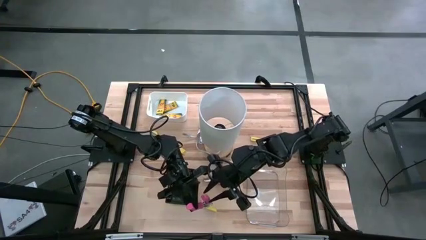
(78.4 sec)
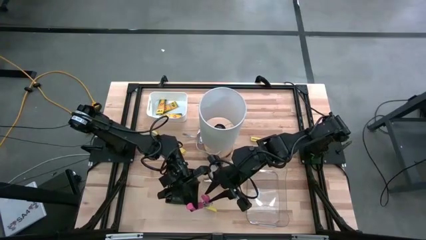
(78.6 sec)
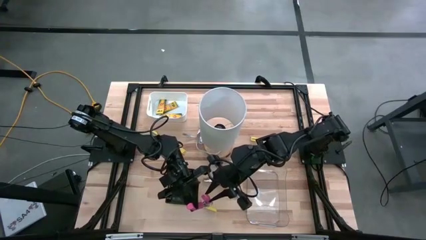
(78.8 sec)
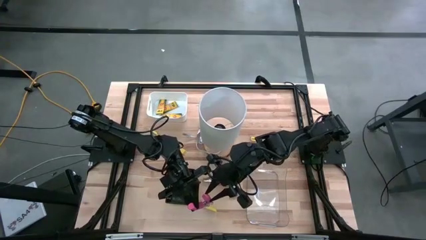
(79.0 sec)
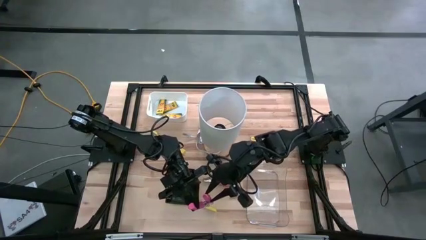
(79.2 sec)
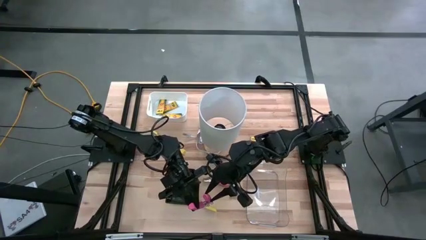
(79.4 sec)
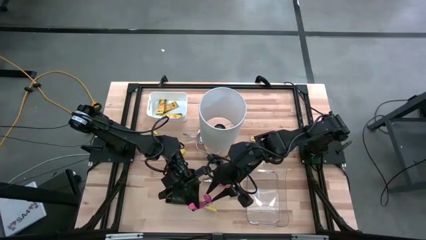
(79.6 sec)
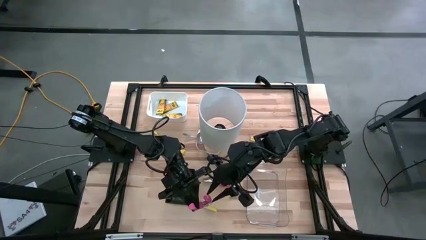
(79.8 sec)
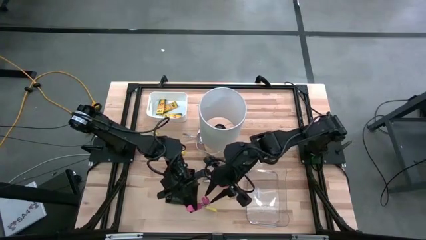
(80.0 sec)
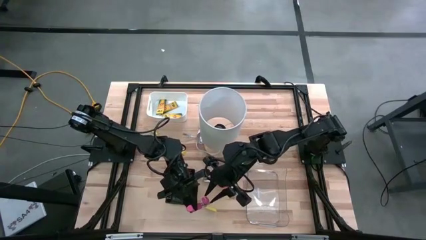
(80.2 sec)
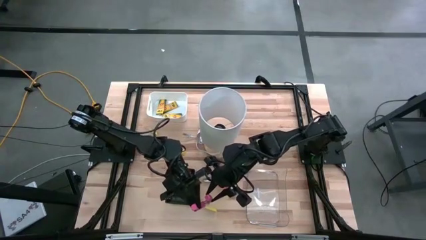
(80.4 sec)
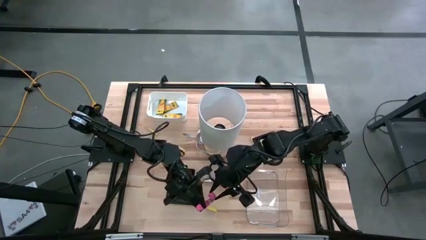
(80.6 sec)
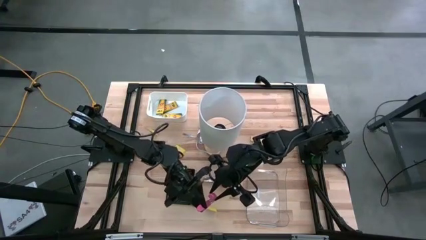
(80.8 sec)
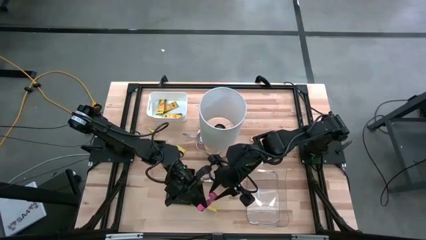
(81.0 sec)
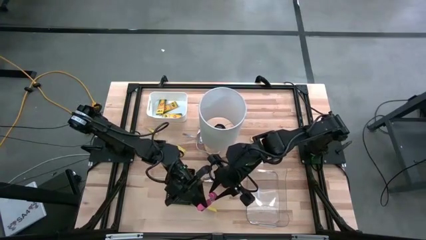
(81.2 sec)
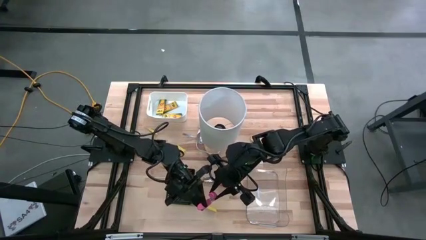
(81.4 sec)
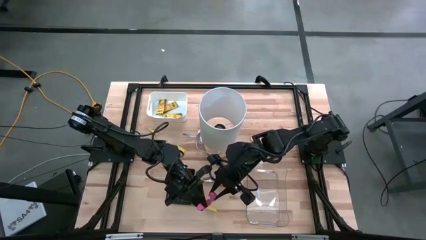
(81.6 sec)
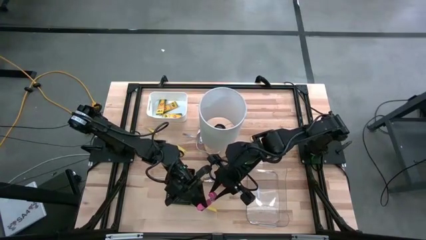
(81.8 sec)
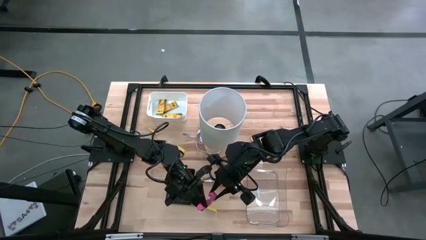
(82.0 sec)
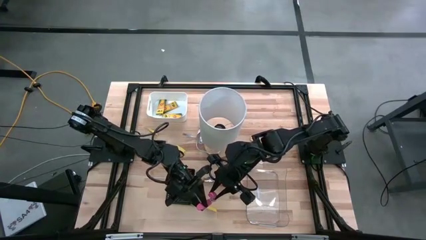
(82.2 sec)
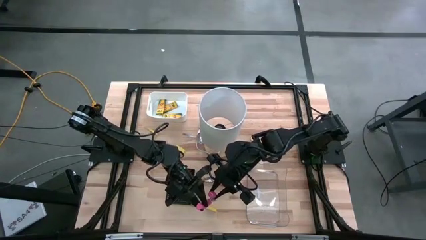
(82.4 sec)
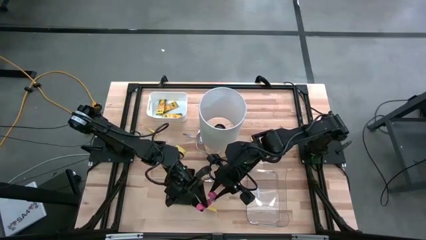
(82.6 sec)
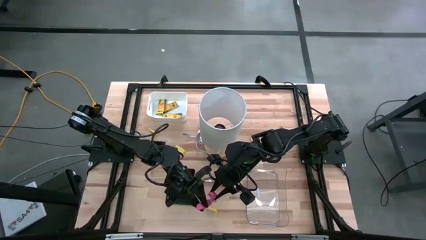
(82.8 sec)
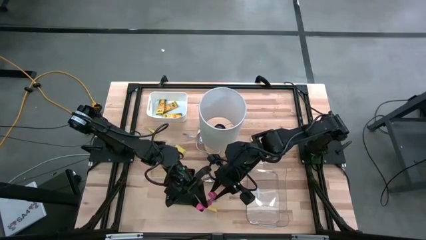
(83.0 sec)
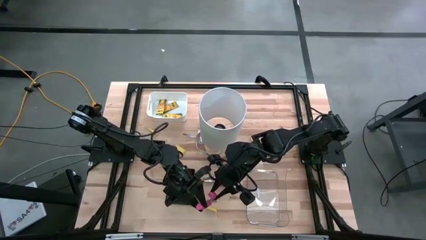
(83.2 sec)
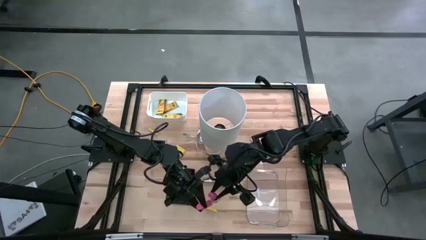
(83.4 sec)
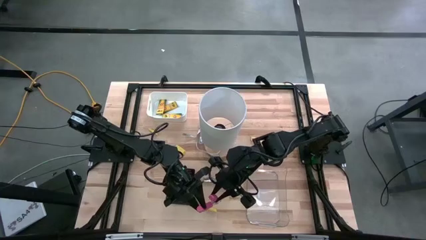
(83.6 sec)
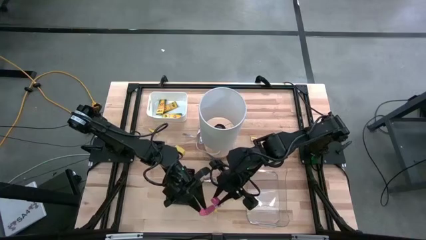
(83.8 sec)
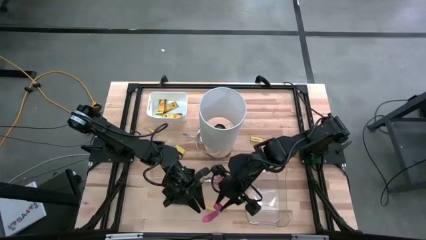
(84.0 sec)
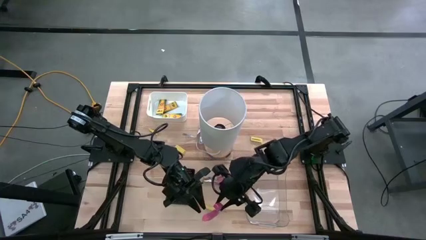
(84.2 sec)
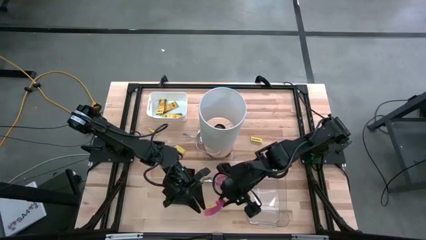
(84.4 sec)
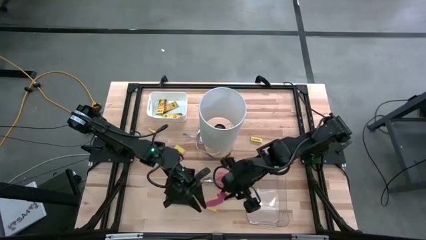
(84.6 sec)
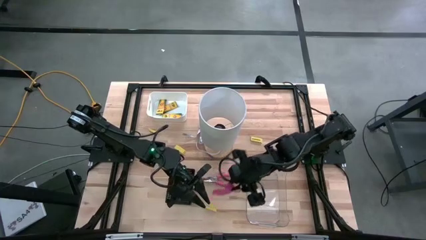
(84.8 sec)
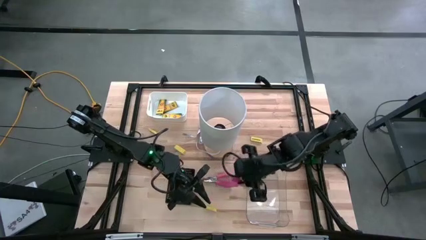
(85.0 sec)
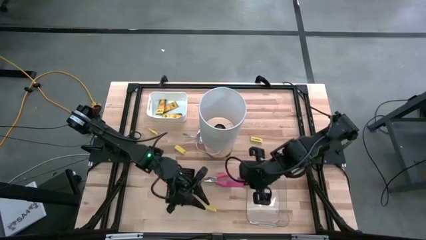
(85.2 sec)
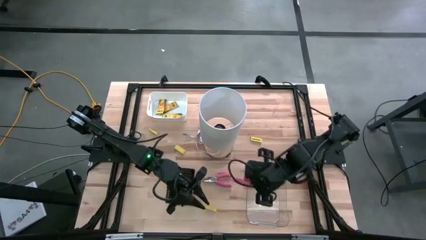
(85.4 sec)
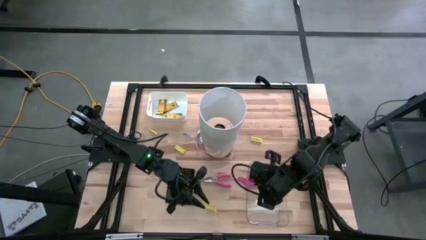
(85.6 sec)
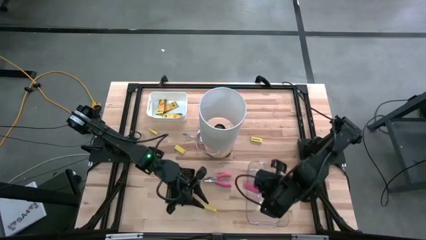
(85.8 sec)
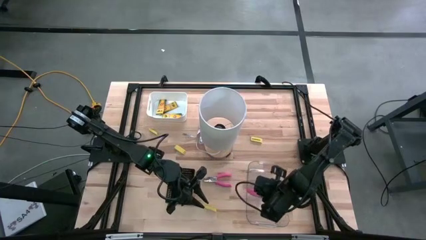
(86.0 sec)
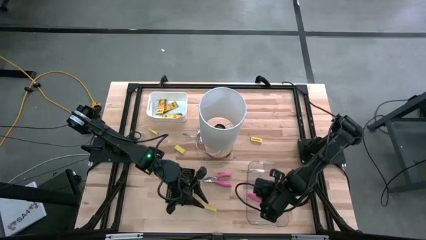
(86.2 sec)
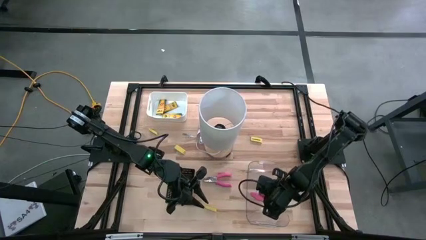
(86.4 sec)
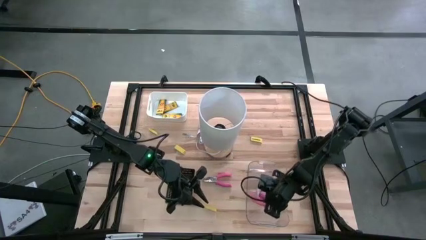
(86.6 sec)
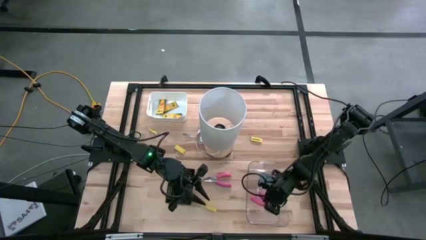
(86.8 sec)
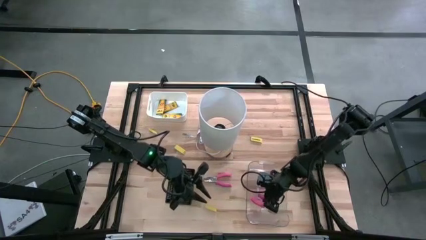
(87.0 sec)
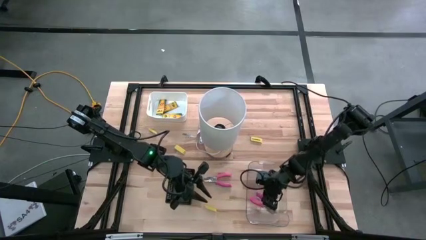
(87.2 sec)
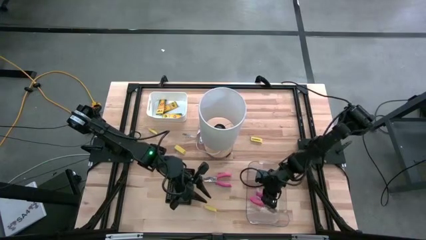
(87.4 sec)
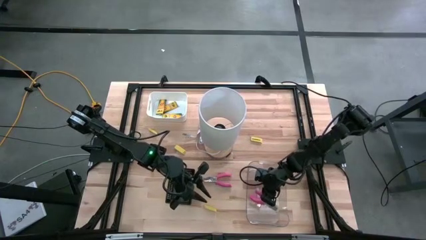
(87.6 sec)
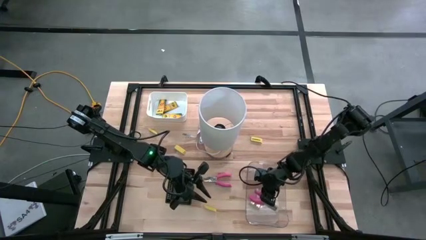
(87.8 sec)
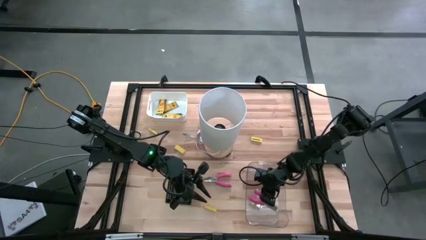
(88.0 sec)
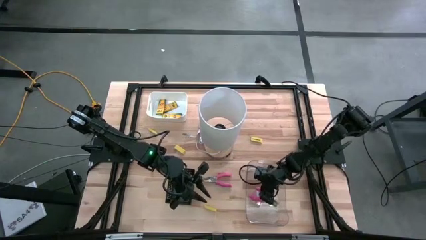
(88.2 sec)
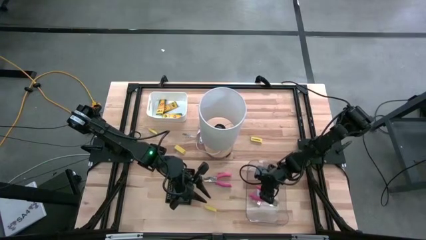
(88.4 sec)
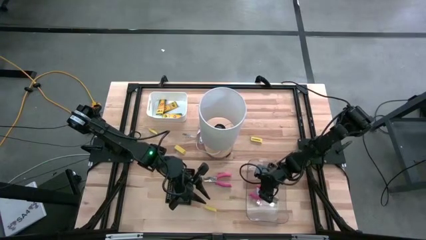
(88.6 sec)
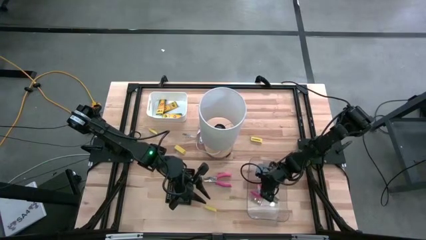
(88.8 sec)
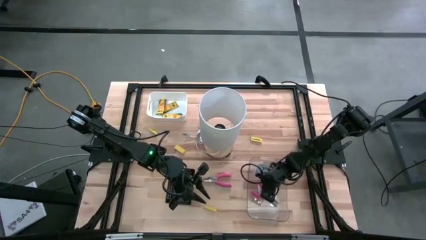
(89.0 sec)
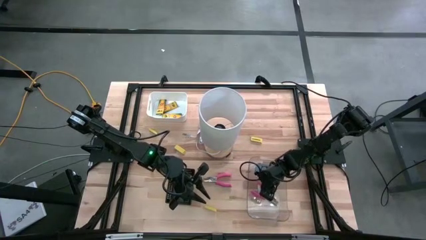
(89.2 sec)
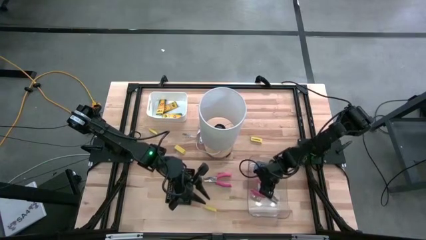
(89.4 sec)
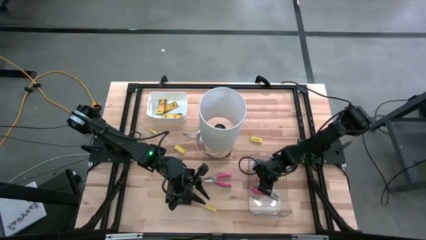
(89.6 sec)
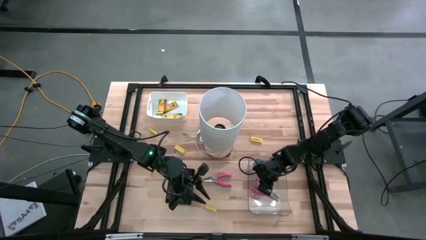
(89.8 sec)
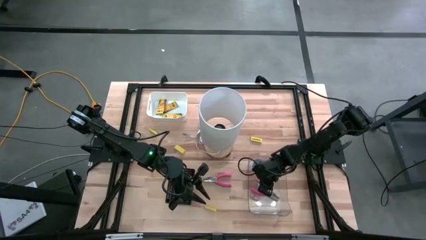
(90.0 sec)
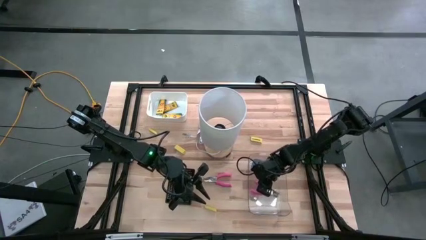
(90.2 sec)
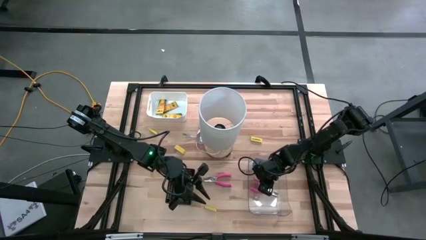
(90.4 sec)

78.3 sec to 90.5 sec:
Task: Pick & Place School Supplies
Put the pink hole puncher into the transparent bin

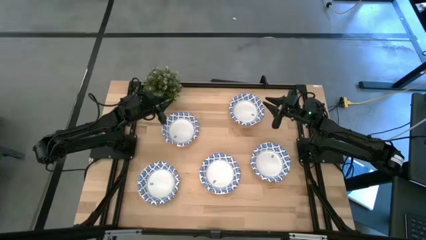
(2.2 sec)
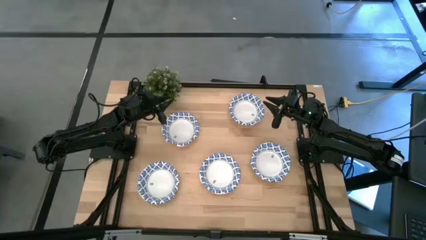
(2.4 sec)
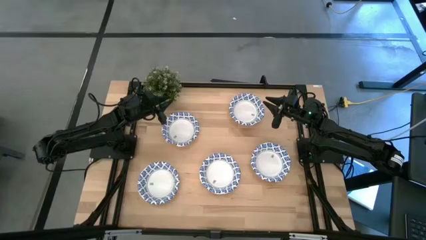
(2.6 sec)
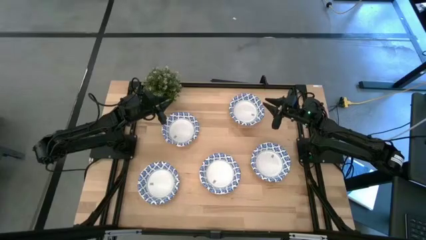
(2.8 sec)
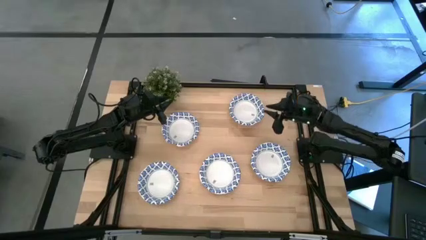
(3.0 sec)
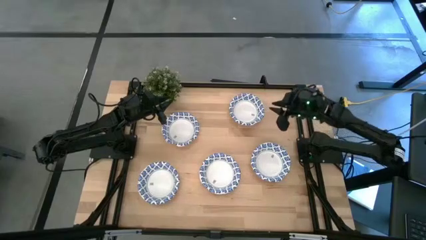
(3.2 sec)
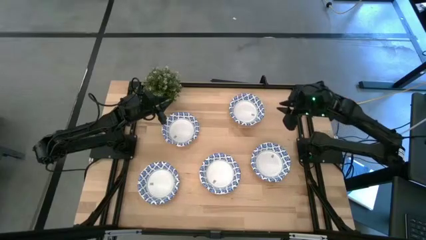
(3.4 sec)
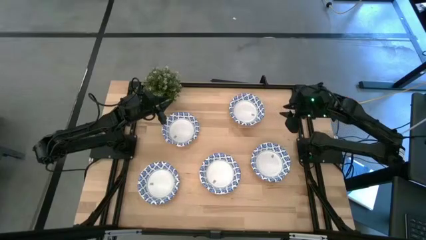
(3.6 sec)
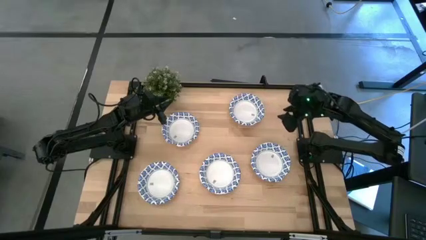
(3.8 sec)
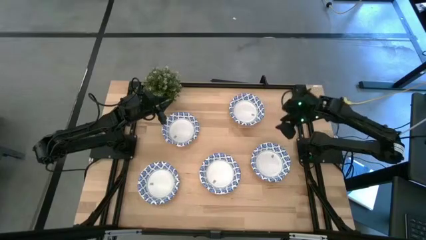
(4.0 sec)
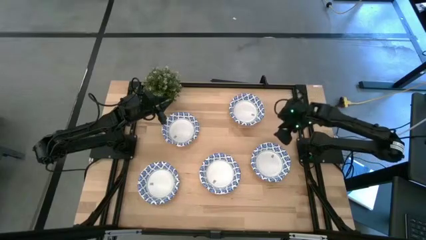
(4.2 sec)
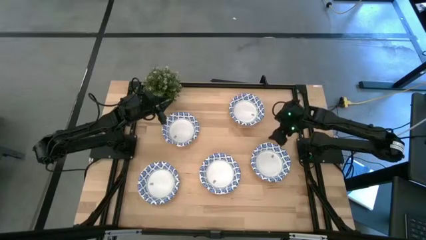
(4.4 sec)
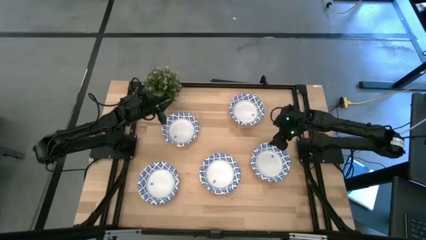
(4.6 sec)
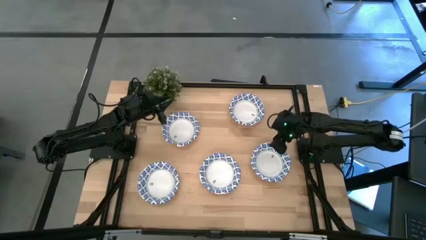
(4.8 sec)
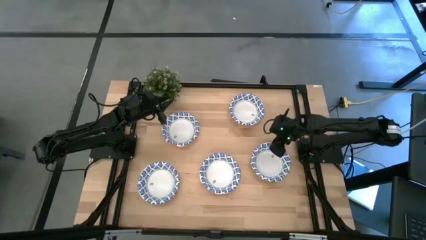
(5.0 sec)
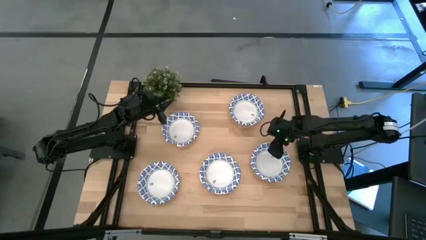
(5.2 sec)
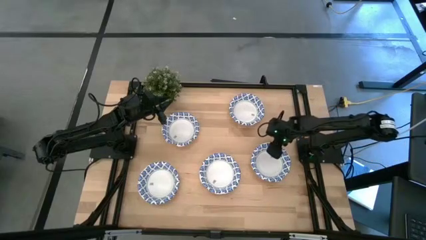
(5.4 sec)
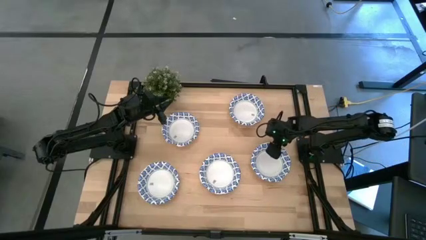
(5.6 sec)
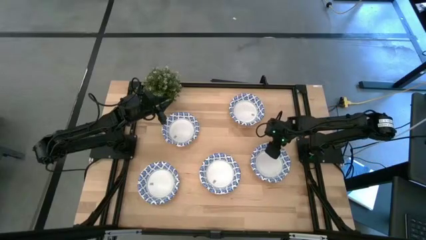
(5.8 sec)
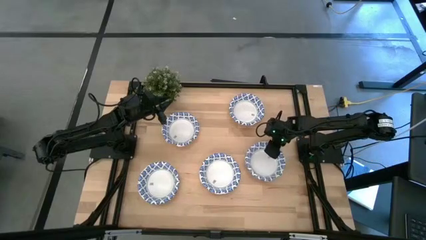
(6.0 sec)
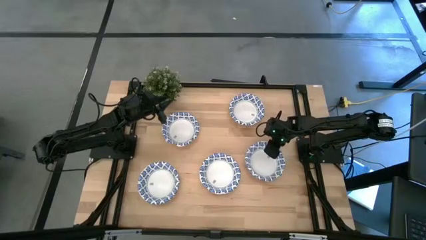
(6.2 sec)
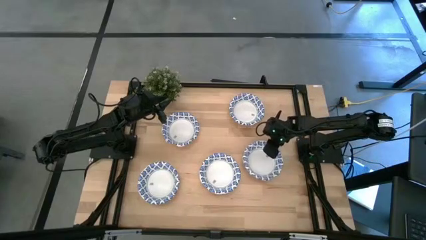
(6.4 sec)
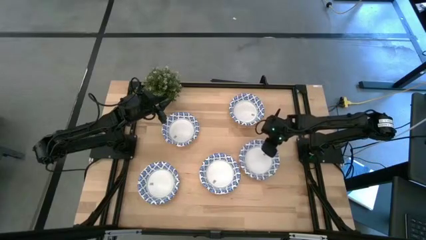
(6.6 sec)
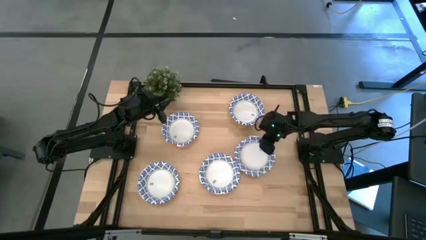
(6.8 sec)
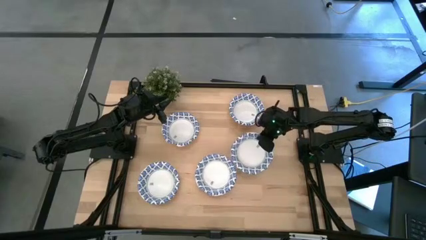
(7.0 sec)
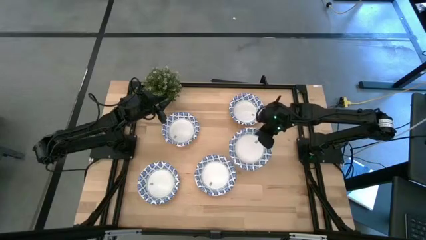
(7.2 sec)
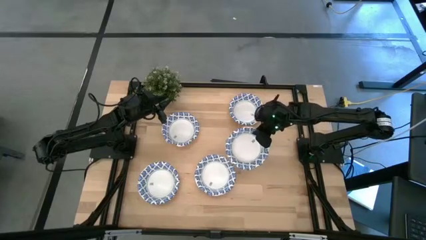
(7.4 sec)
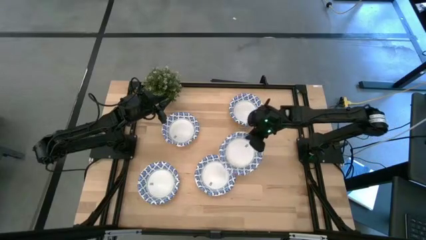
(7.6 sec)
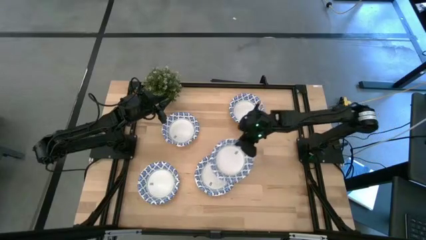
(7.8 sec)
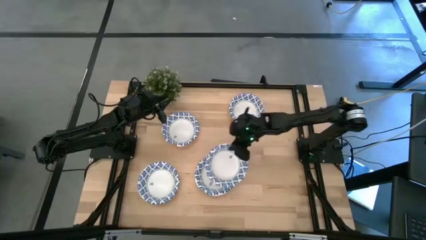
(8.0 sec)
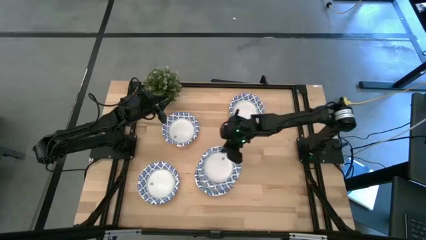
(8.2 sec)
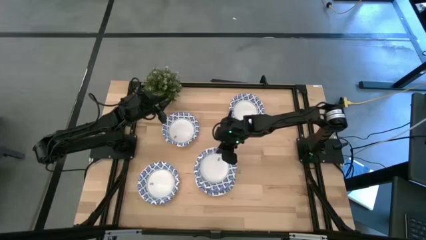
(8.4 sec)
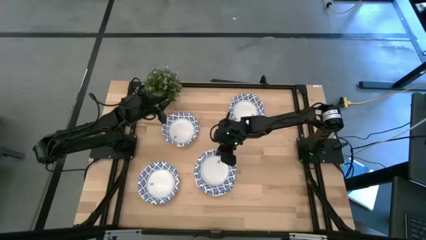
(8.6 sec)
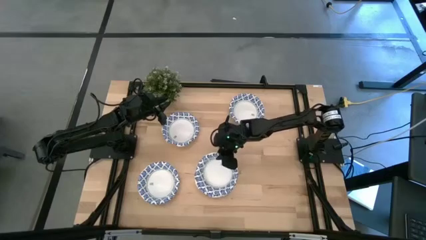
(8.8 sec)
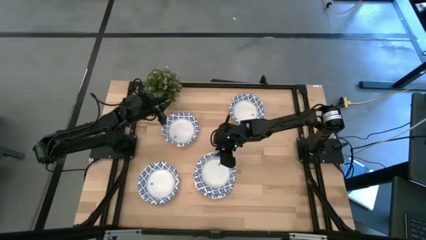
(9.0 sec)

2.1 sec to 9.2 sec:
Task: Nest bowls inside each other
Stack the white bowl on top of the other white bowl
